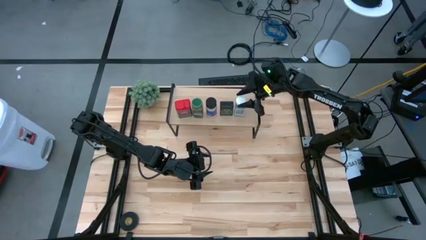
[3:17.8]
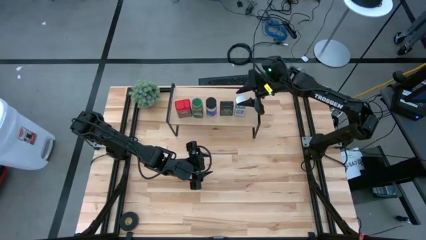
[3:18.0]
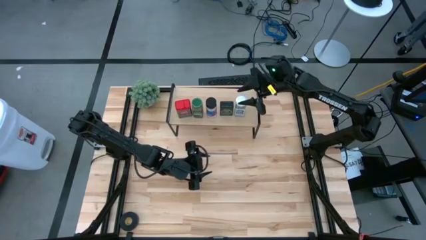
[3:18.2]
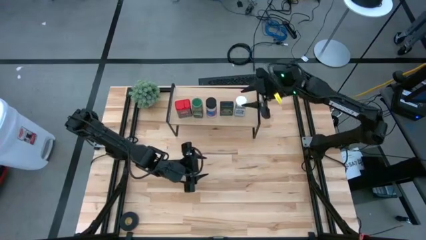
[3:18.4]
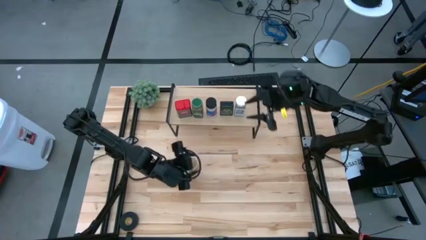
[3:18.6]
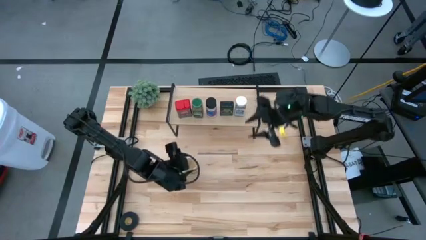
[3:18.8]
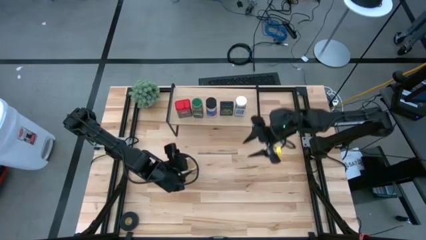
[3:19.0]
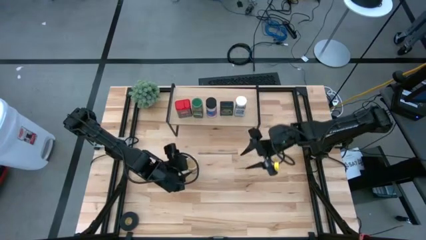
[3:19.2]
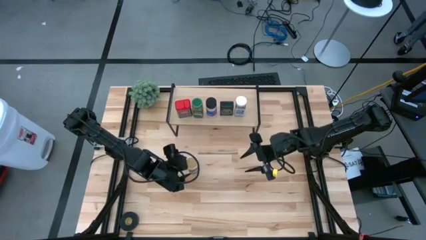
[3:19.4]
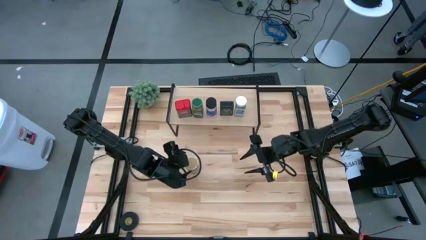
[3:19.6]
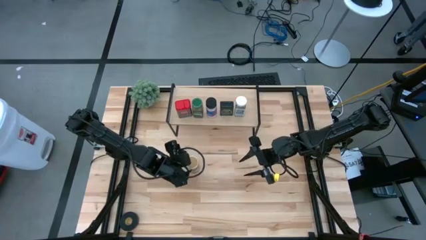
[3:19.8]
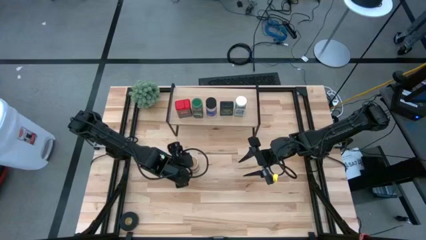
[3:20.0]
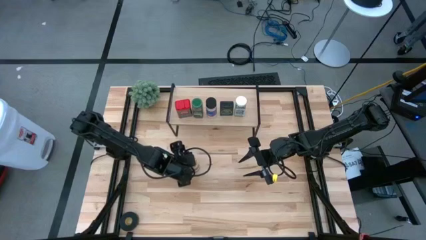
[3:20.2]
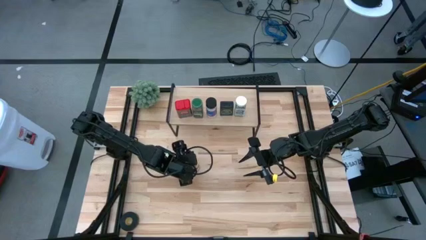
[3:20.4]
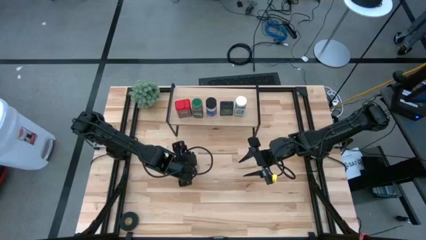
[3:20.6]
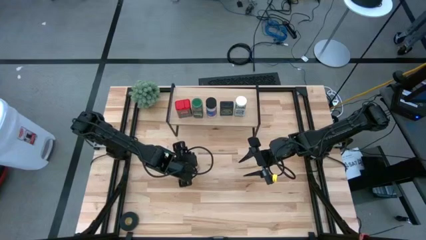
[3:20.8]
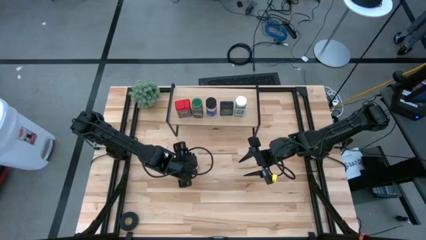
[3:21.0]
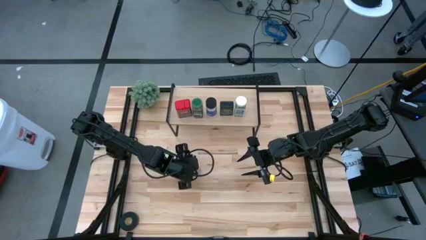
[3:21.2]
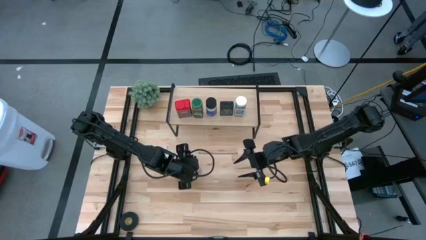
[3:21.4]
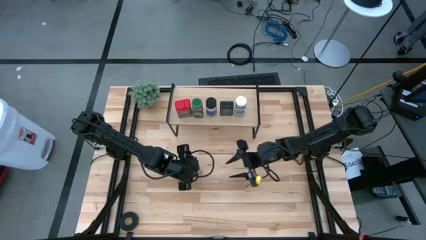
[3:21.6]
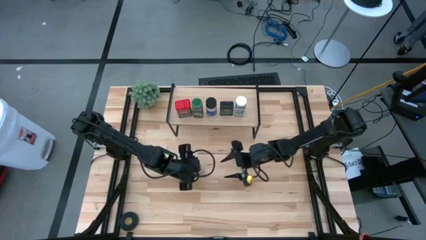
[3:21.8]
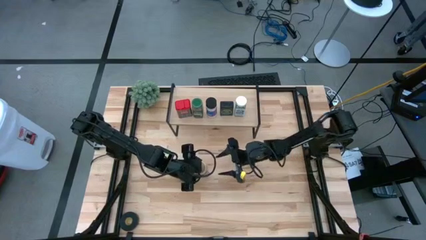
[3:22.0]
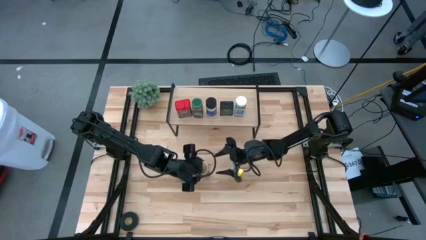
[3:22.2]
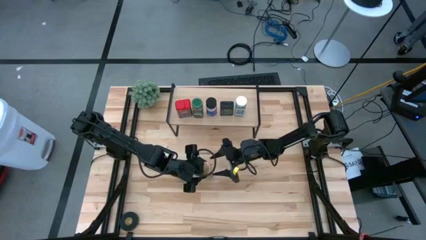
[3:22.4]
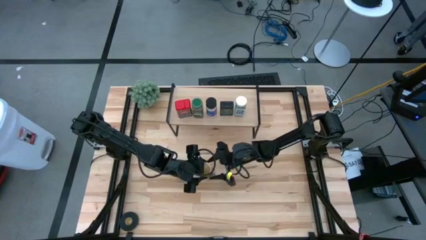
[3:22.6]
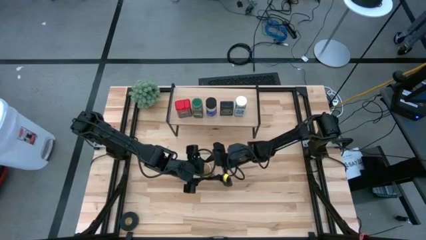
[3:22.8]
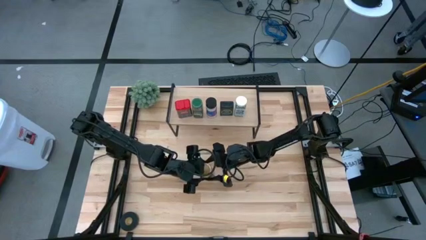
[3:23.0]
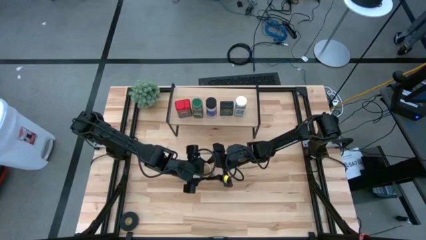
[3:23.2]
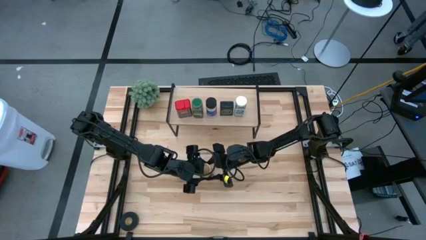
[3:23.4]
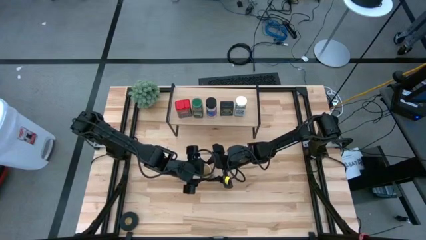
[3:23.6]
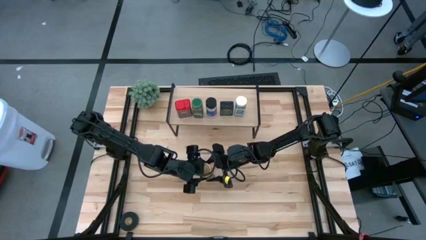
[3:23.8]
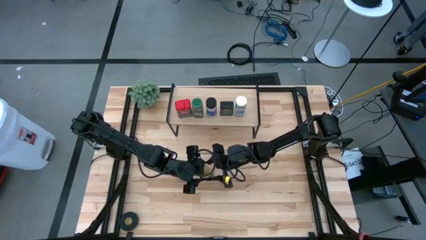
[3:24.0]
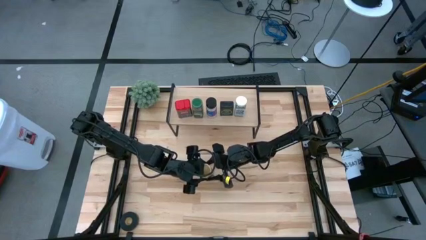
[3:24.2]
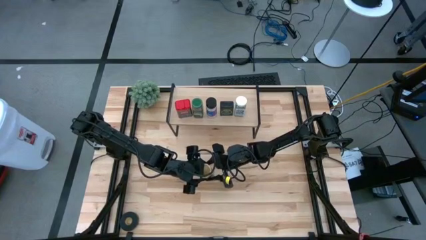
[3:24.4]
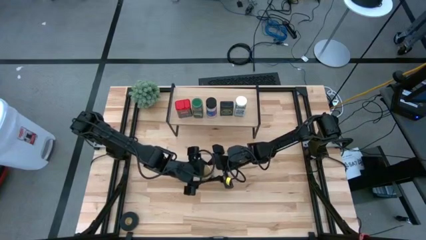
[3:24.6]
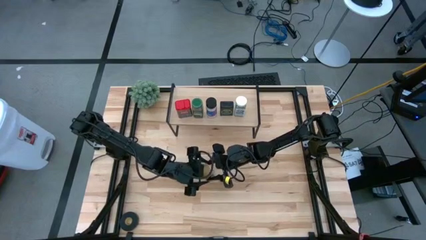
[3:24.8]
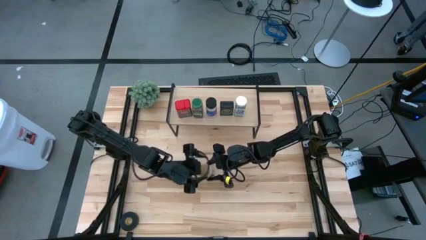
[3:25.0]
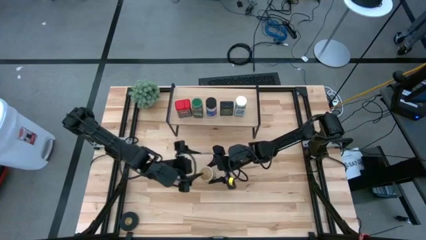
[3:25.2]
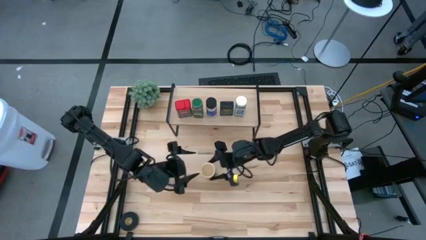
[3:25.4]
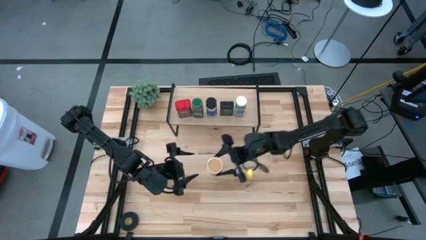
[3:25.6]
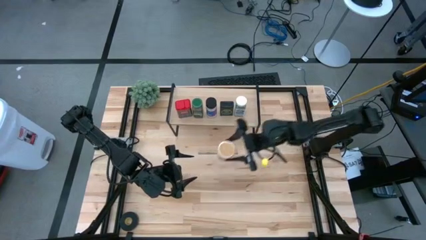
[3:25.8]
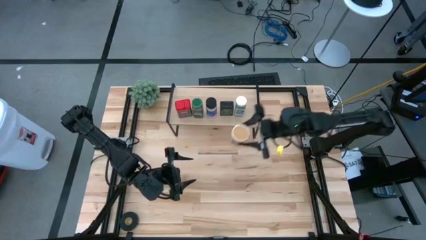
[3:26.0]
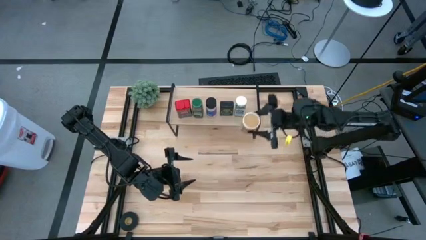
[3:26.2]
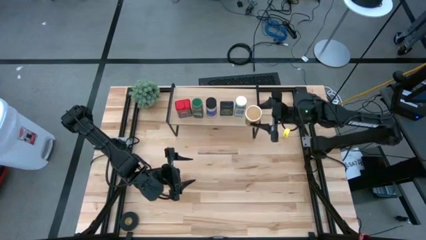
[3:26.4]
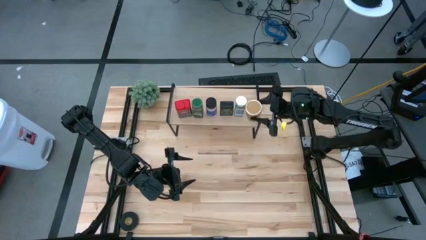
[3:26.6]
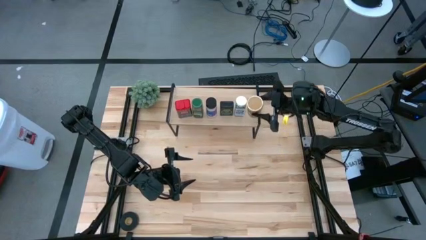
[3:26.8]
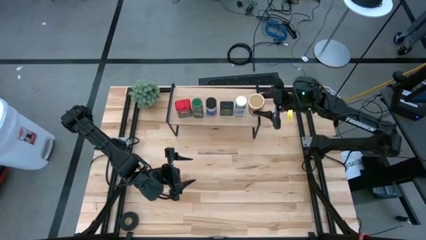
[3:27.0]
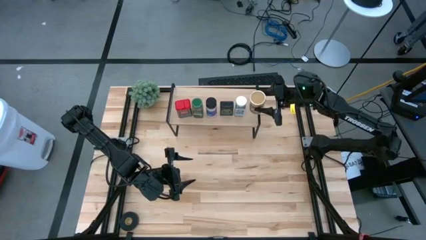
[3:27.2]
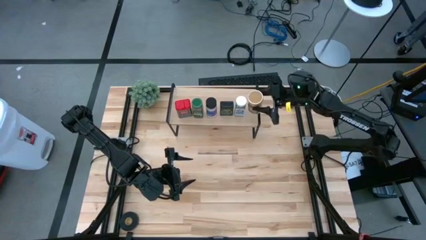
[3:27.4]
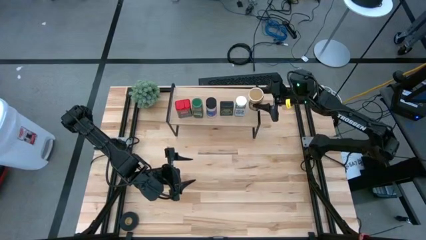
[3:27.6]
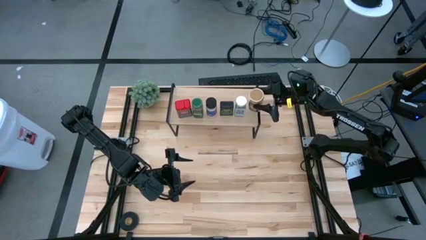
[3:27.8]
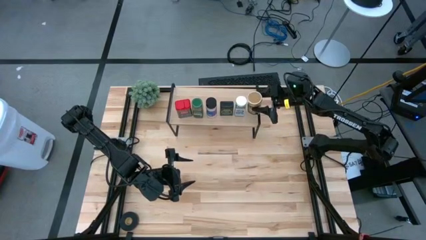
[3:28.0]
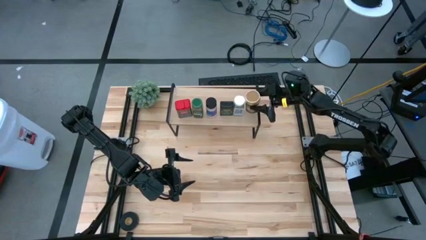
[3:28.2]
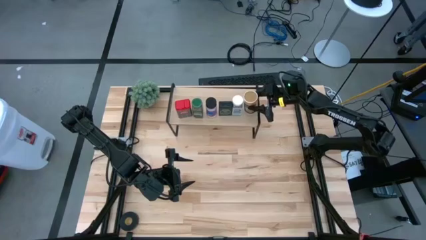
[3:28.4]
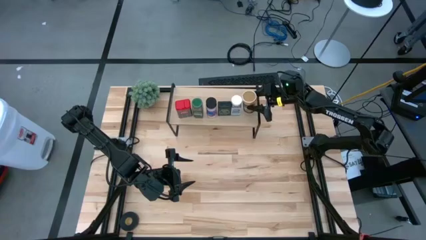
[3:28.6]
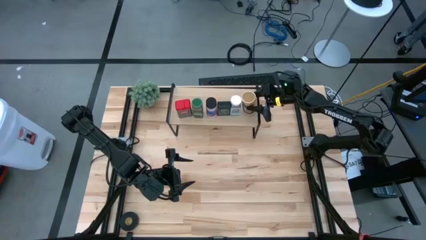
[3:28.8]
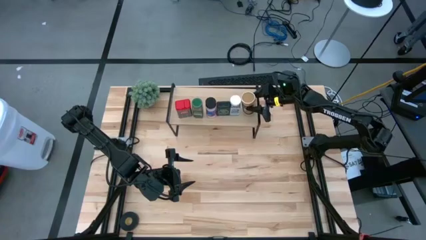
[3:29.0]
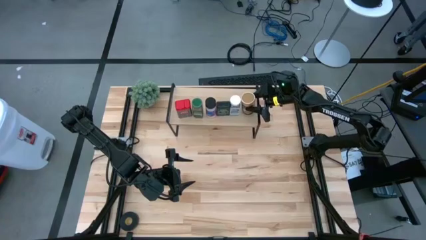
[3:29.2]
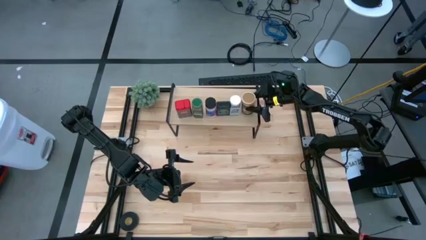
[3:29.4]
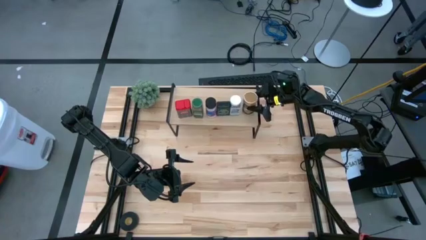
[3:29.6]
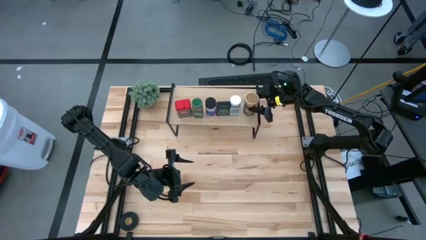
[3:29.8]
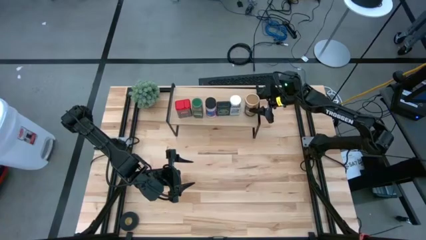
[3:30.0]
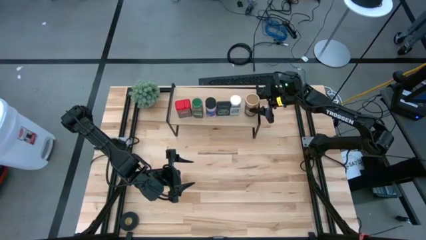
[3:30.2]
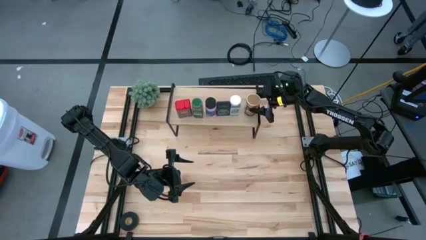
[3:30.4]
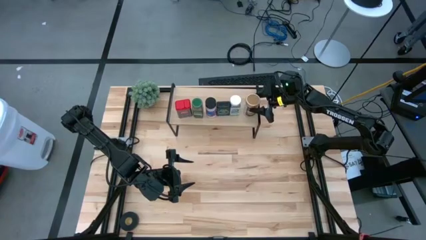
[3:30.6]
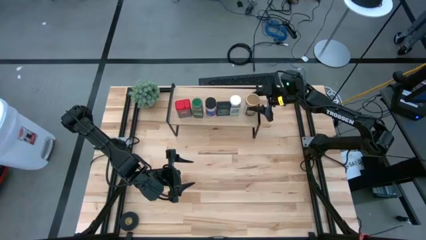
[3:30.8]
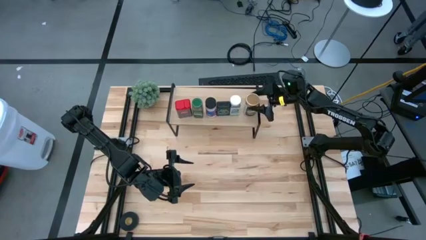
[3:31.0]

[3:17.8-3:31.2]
Task: Shelf spices
Put the golden seasoning bottle on the shelf aligned with the other white seasoning bottle

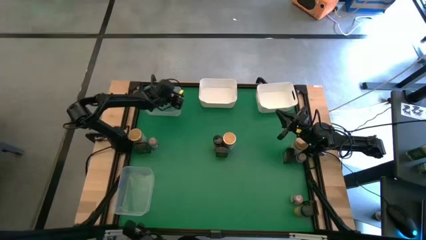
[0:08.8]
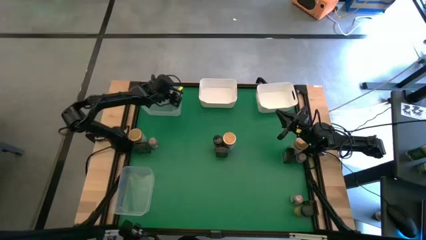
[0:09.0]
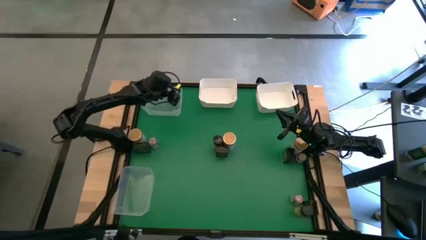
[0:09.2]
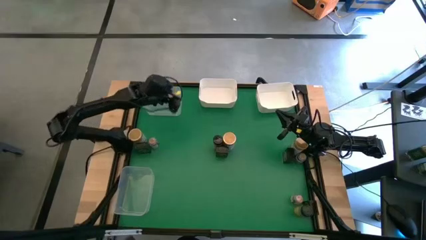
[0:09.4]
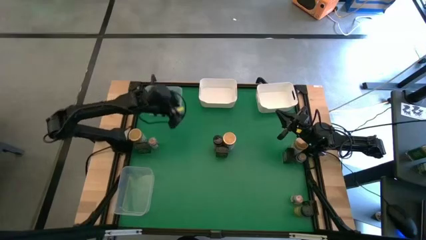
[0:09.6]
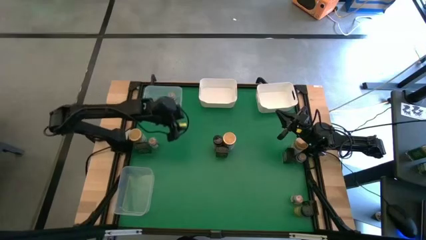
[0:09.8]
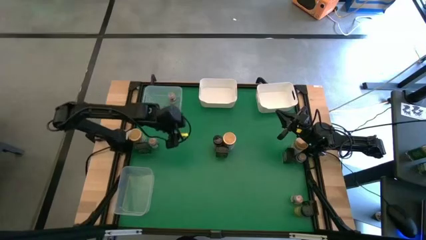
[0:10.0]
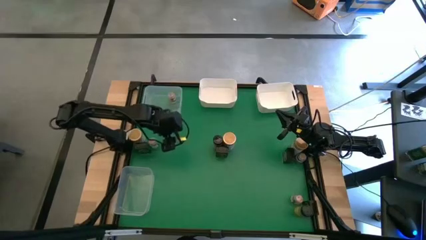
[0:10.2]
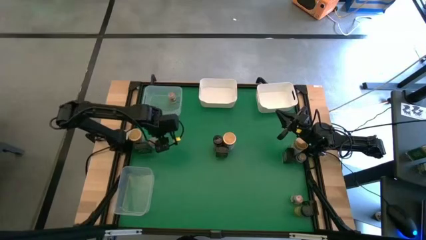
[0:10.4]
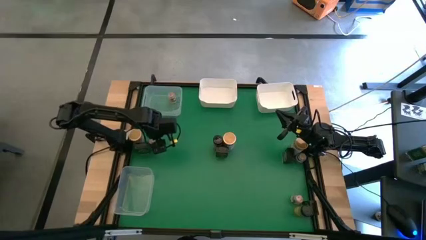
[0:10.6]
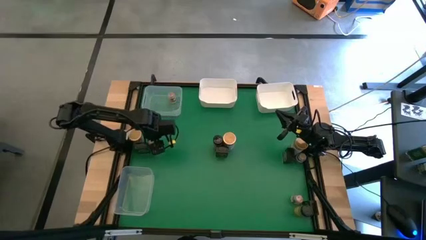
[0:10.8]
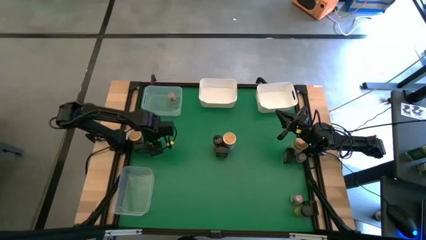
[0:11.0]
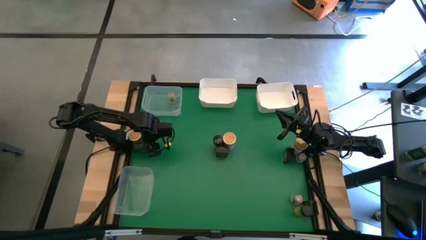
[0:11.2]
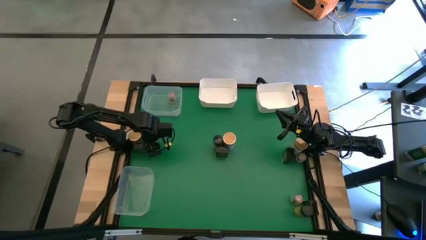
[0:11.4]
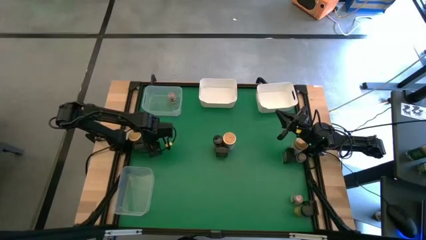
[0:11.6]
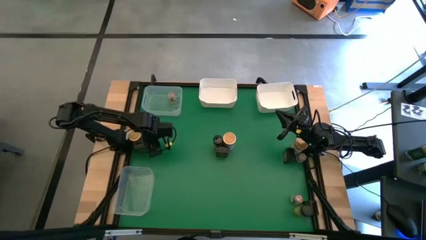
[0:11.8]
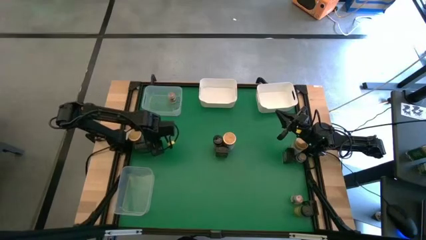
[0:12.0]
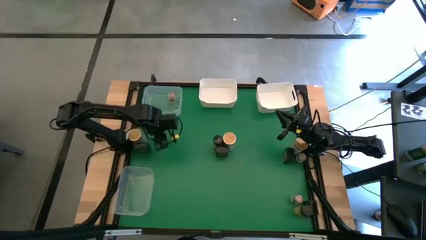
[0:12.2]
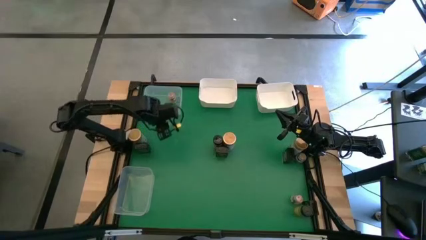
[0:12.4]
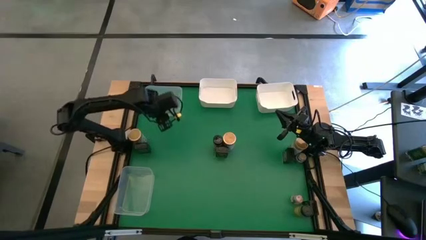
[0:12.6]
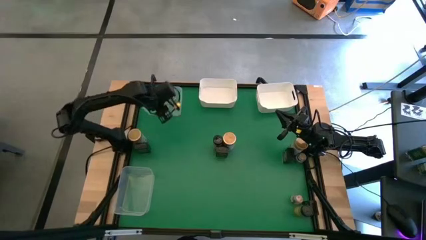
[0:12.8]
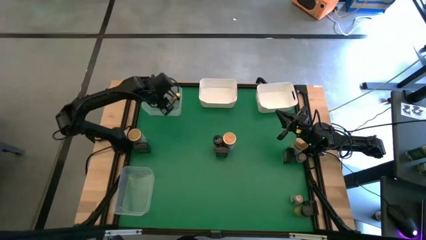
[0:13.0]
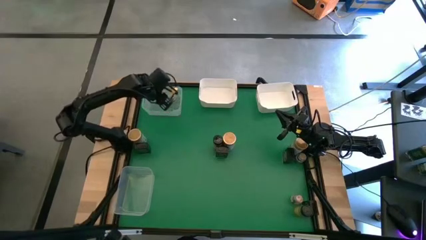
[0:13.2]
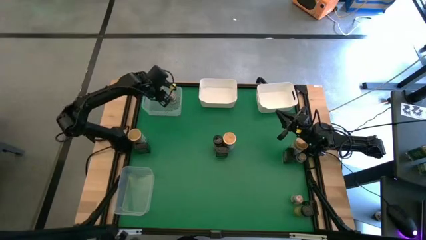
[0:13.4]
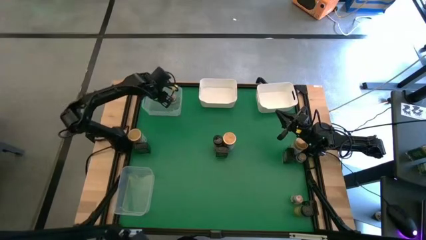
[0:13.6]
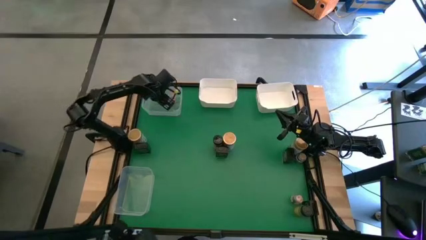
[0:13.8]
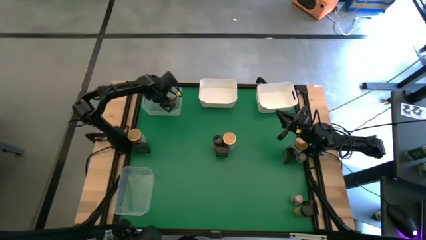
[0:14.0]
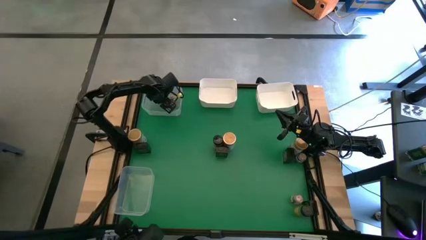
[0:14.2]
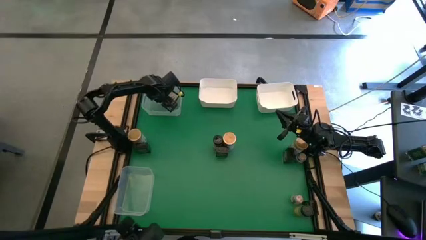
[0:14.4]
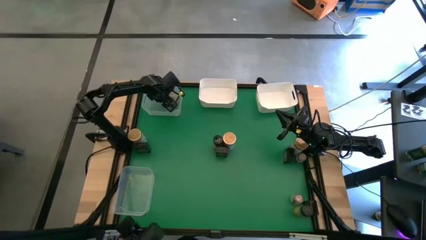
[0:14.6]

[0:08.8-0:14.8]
Task: Sort spices by type
Put the top left small brown seasoning bottle into the top transparent bin
